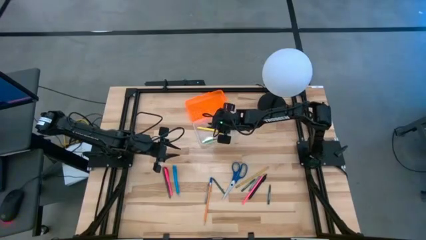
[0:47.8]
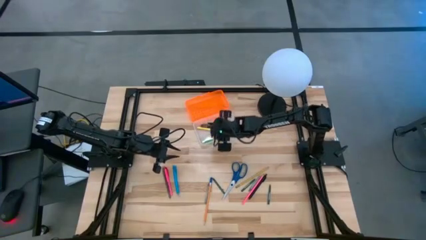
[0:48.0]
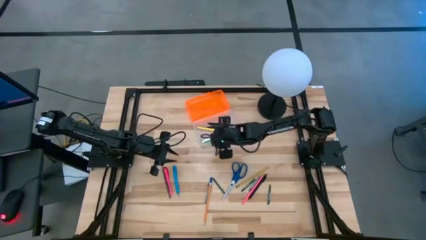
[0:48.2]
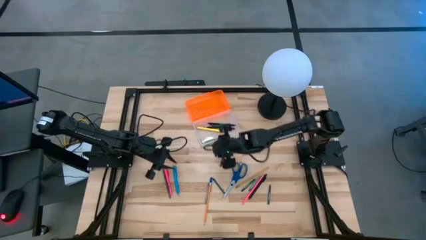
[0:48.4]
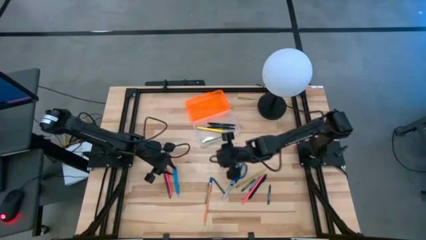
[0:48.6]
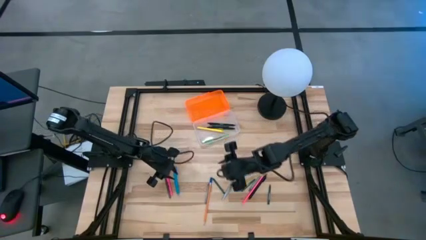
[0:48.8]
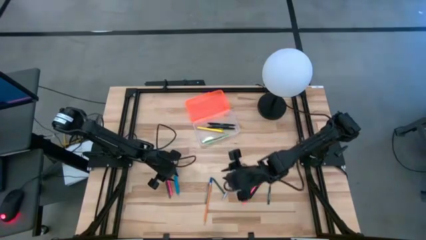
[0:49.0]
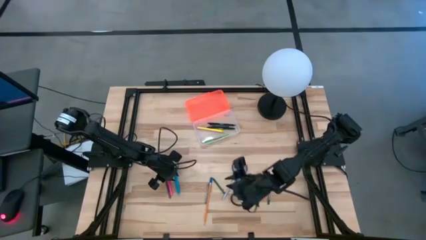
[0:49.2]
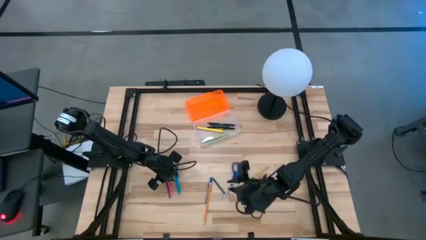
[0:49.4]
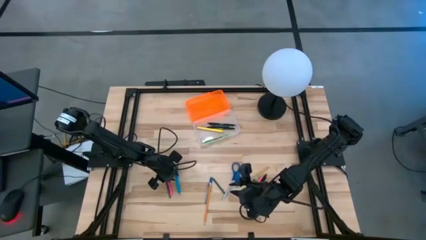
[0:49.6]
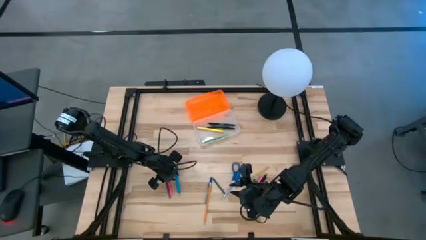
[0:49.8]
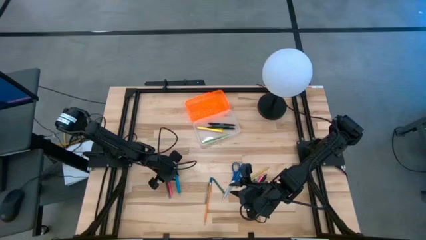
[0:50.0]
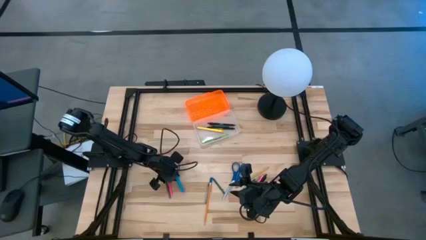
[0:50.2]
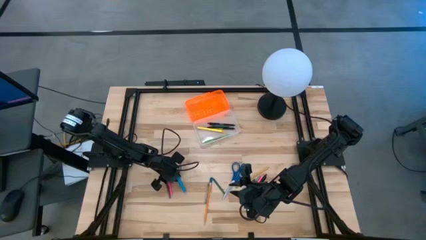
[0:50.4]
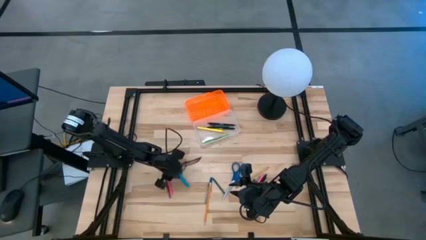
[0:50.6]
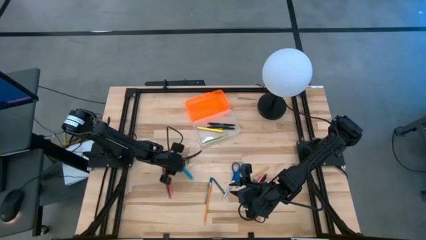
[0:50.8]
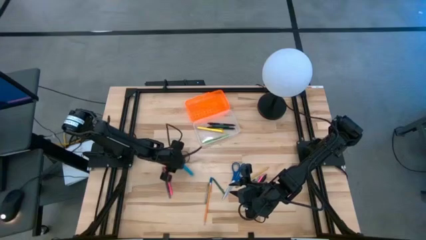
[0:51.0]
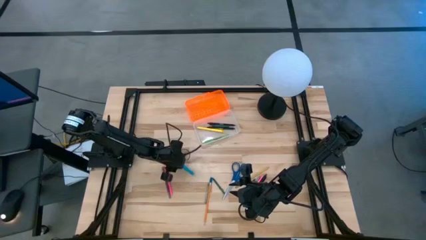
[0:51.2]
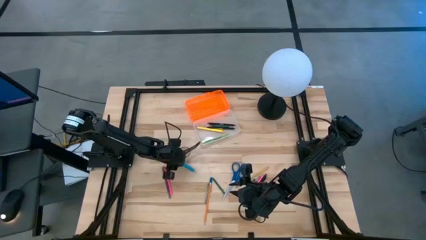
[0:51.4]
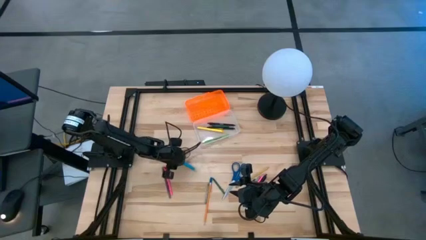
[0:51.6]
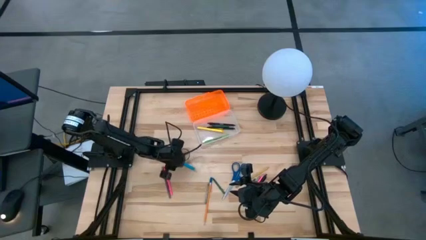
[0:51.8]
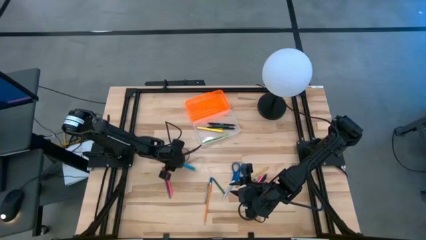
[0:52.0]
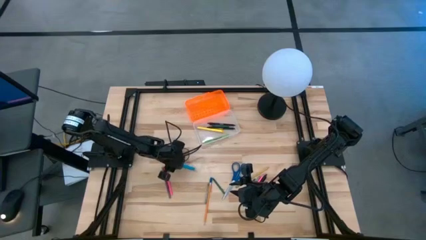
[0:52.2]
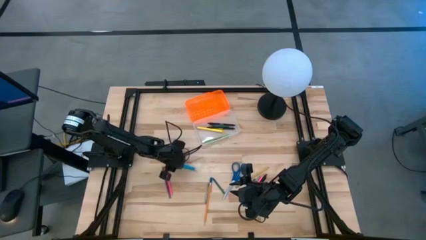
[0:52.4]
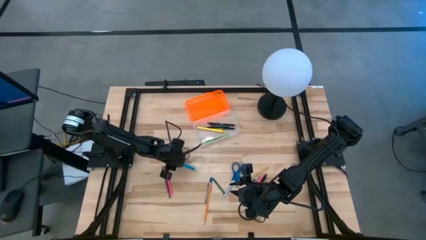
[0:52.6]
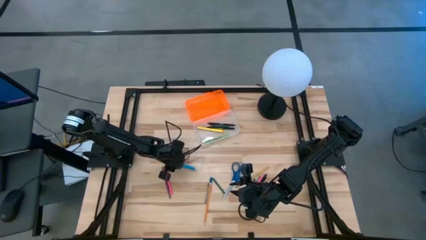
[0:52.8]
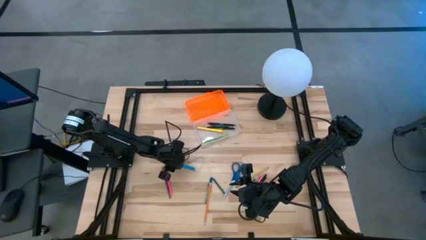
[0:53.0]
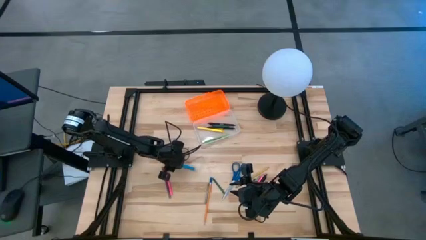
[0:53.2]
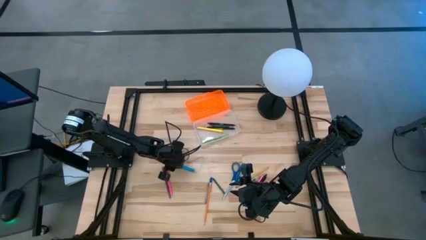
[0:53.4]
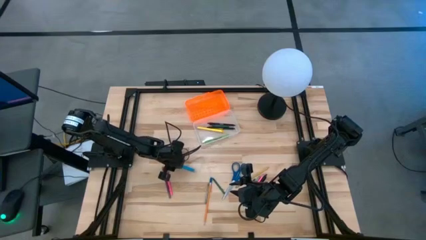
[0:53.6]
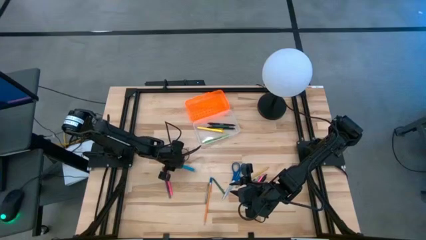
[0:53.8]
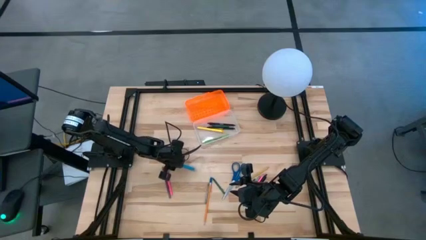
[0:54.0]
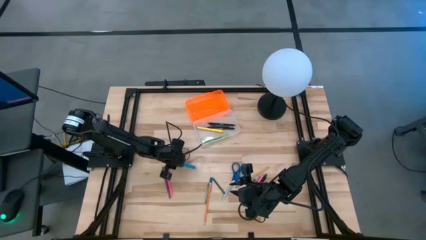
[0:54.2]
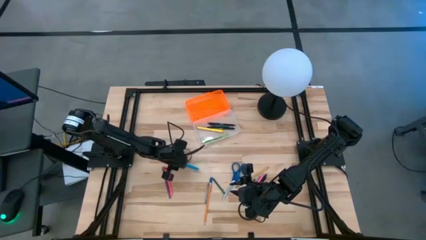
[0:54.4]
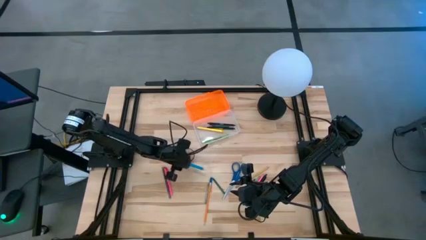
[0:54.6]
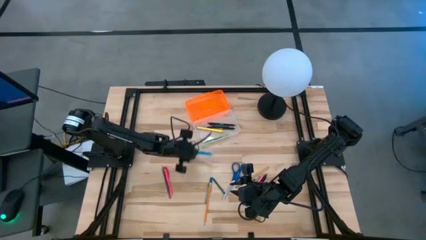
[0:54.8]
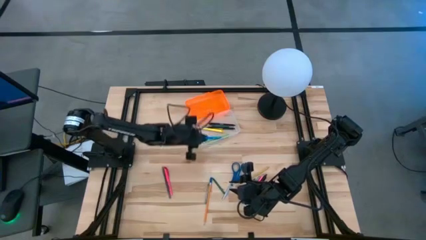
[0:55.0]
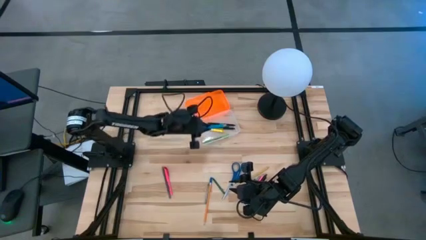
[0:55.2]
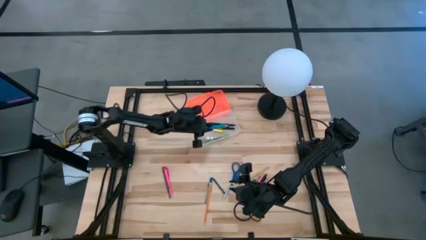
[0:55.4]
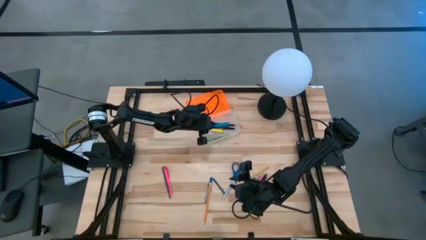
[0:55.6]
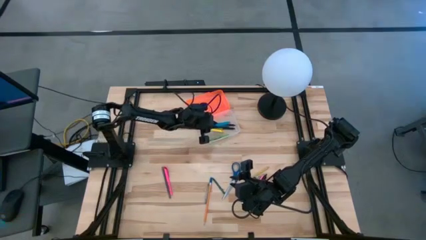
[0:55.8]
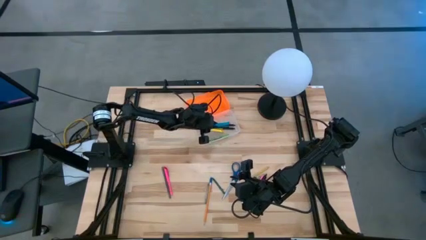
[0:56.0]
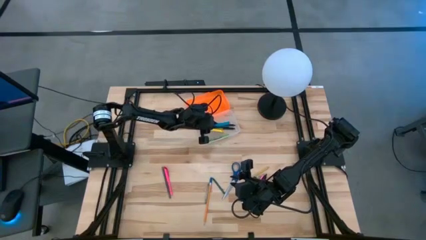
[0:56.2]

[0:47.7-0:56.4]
Task: Pick & place school supplies into a supply box
Put the blue pen into the supply box

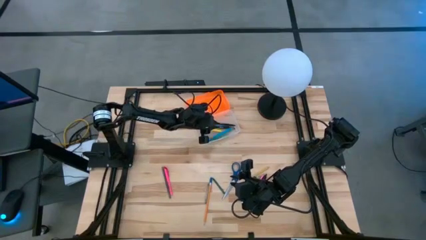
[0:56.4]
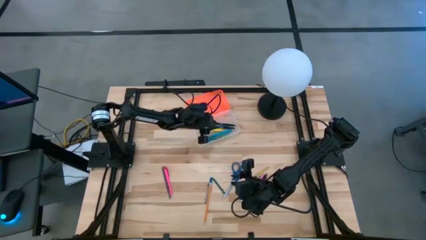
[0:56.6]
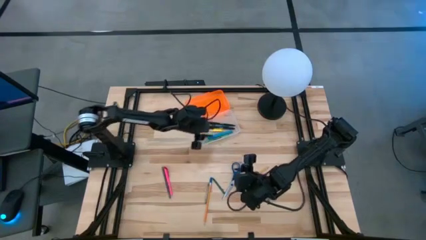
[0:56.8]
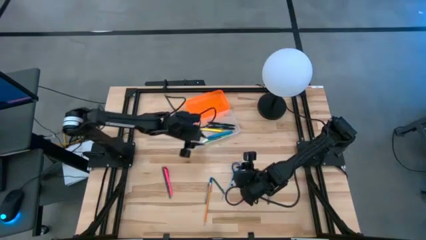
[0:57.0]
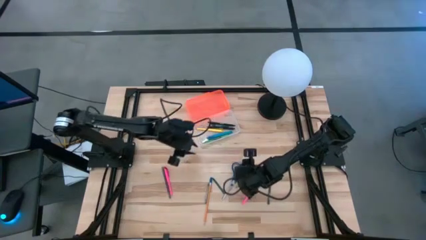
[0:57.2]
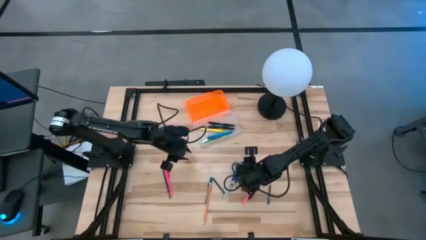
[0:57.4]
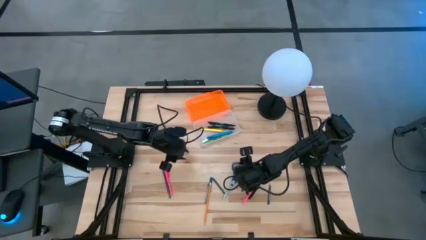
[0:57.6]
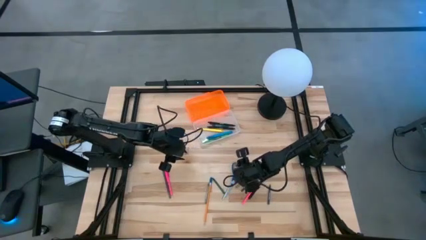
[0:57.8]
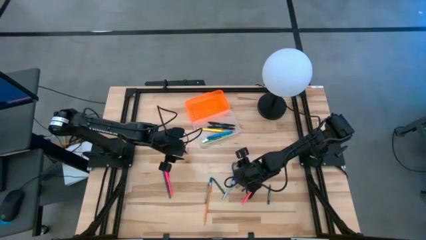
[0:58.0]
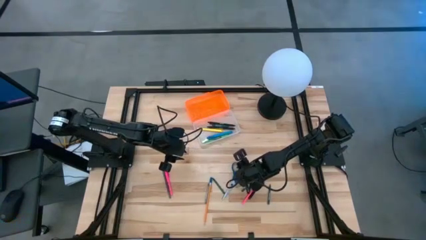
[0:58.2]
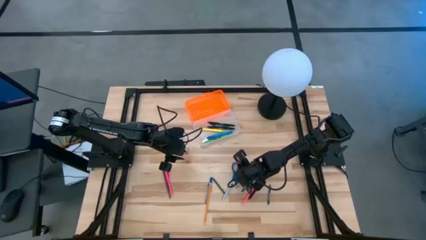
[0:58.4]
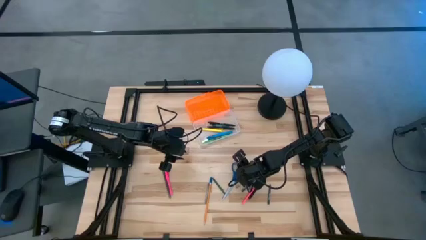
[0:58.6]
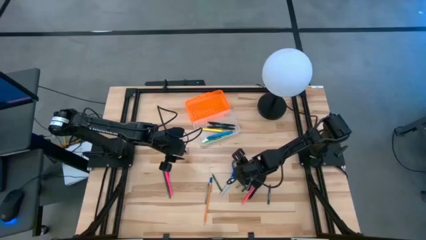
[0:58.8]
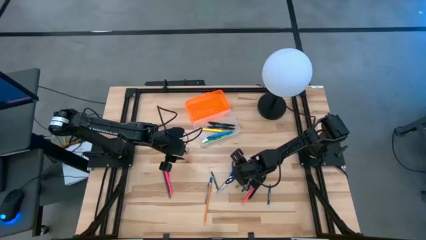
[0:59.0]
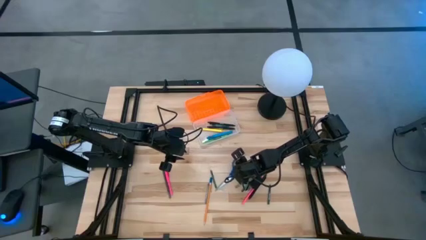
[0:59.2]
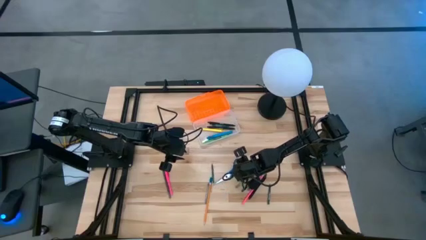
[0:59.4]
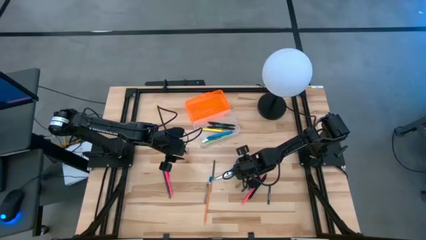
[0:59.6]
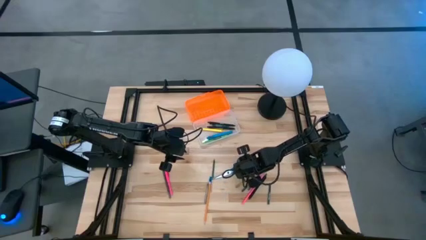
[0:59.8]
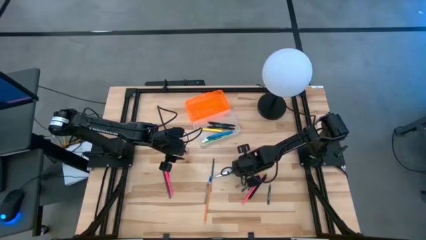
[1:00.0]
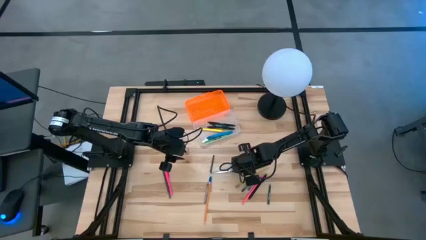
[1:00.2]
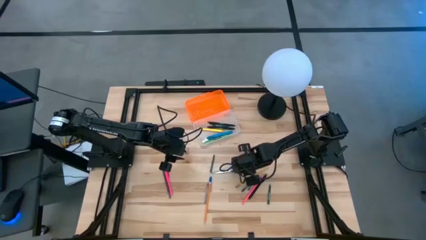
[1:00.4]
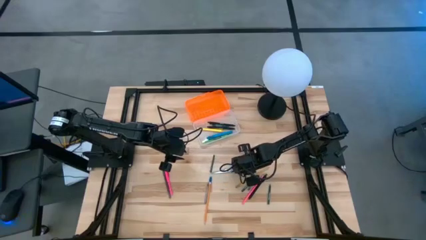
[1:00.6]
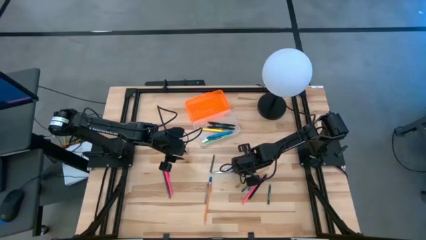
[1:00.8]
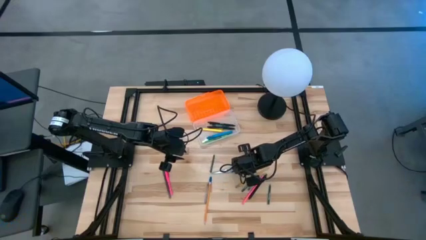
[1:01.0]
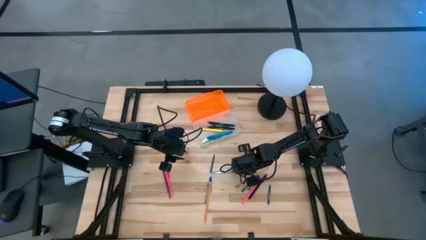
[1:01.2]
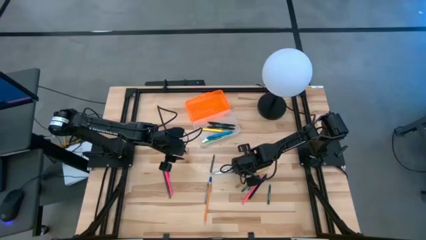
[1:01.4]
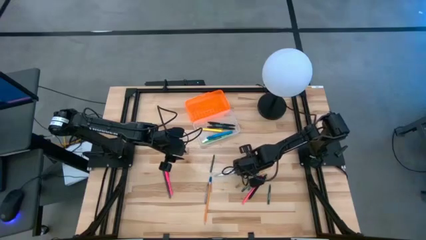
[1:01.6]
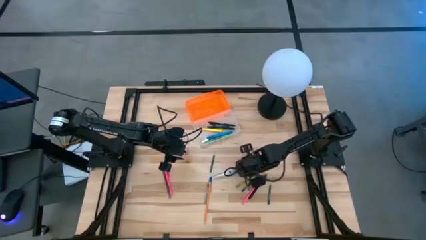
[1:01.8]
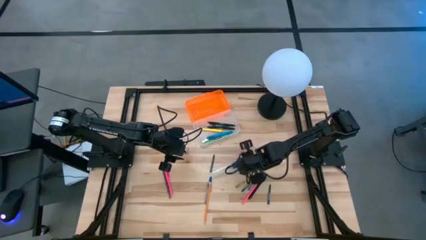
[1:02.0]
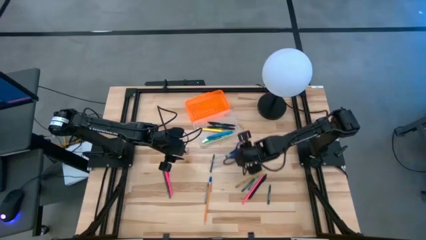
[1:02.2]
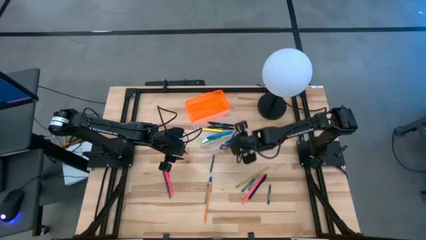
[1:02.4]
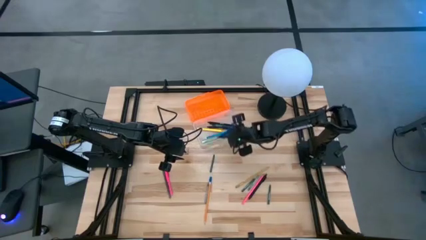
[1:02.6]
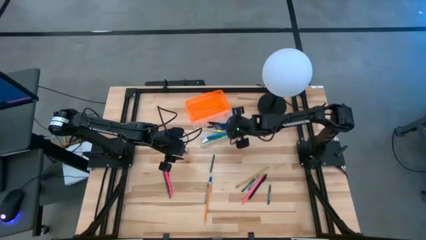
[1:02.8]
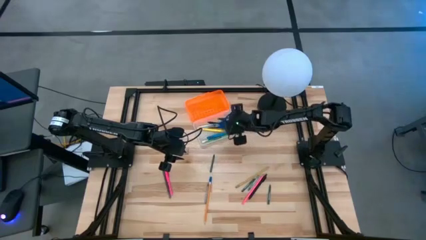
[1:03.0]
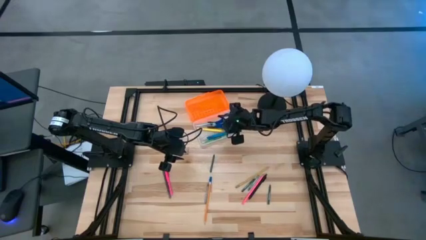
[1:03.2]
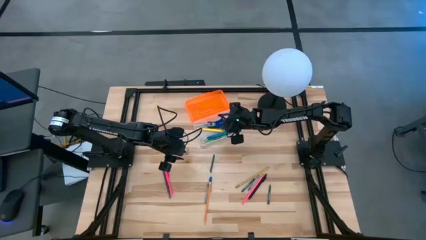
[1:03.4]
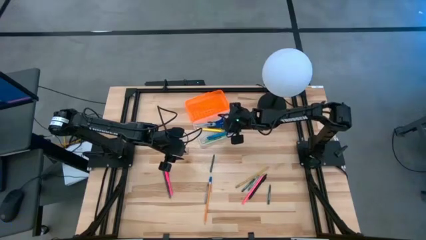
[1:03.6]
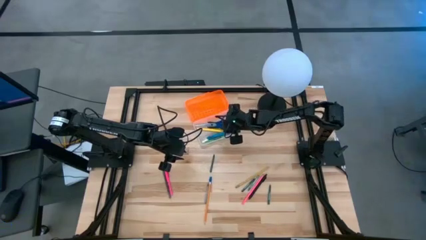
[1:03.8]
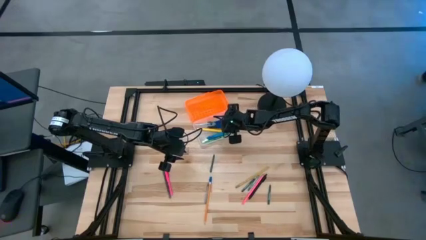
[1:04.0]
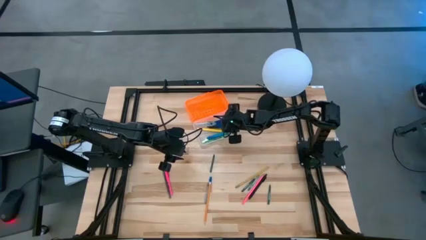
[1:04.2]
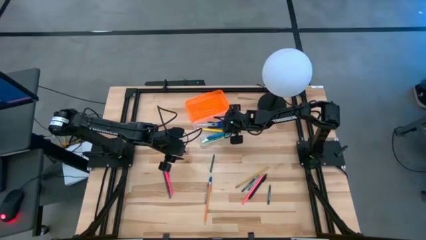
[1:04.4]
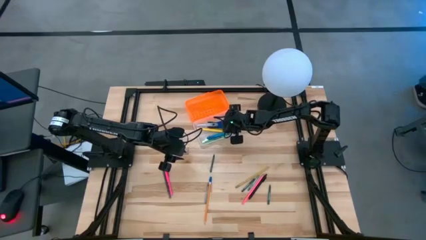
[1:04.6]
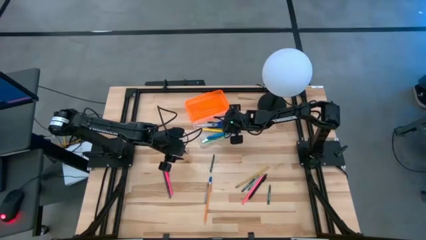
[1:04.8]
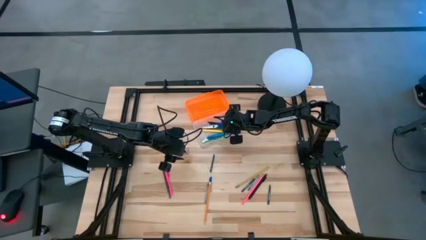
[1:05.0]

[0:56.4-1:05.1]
Put the blue scissors into the supply box
